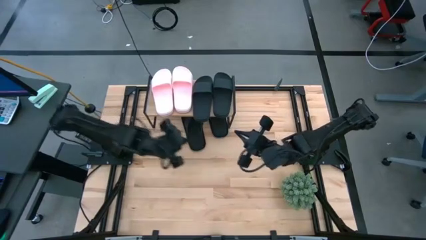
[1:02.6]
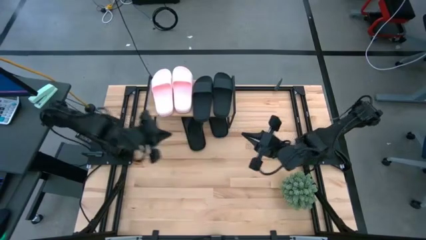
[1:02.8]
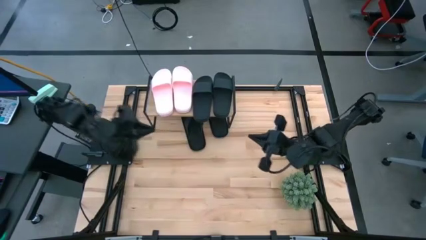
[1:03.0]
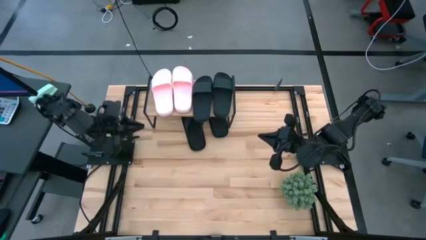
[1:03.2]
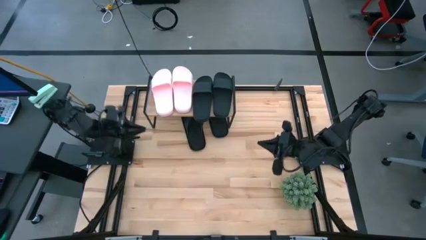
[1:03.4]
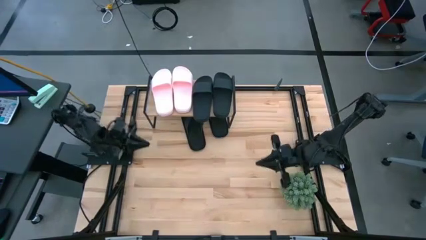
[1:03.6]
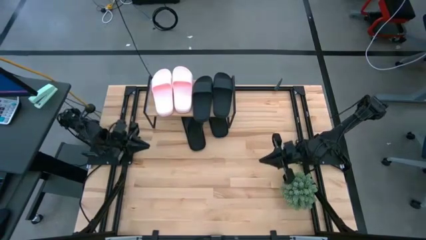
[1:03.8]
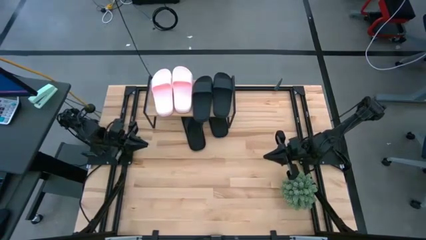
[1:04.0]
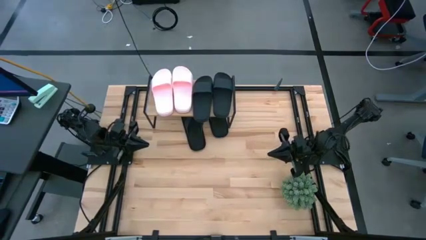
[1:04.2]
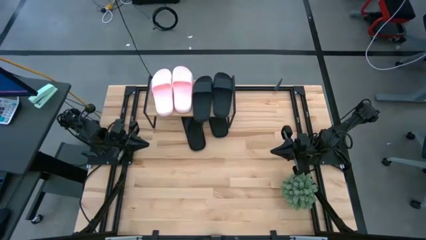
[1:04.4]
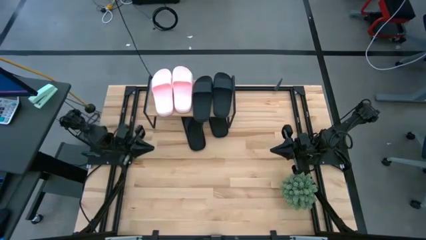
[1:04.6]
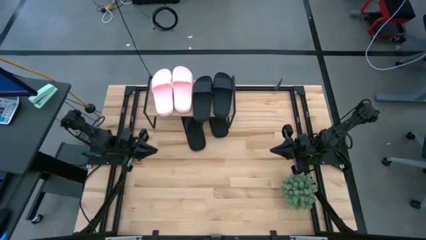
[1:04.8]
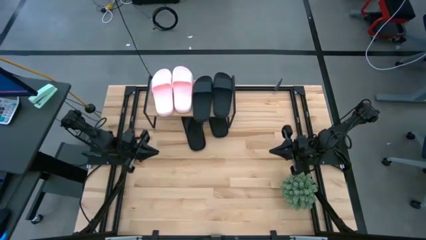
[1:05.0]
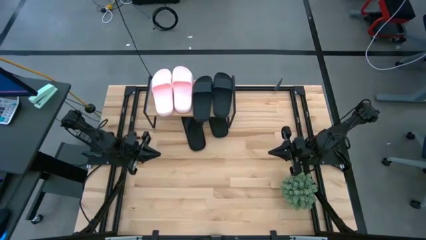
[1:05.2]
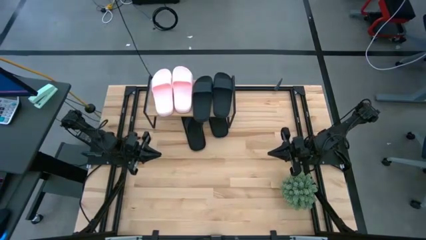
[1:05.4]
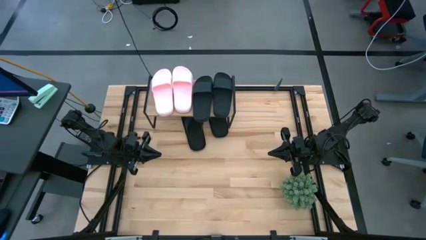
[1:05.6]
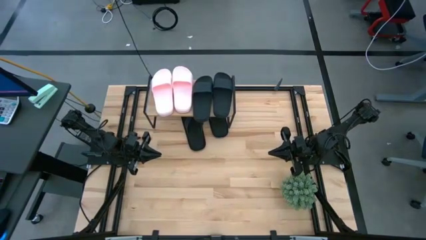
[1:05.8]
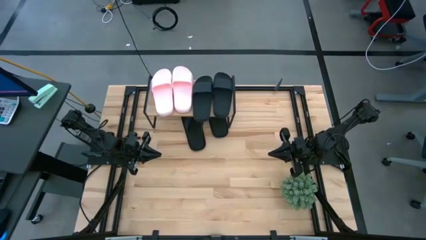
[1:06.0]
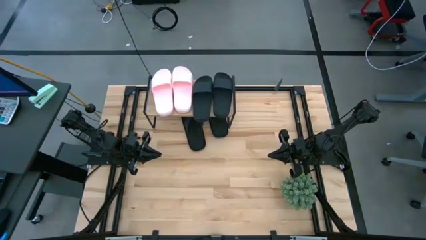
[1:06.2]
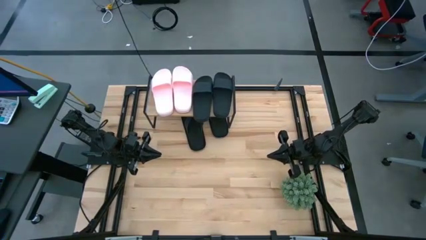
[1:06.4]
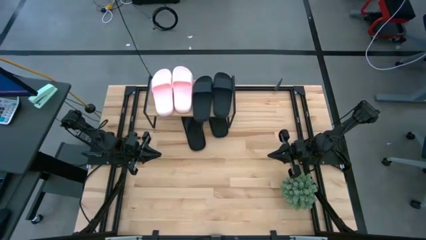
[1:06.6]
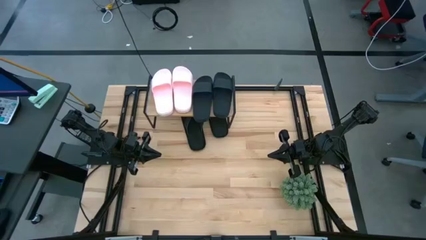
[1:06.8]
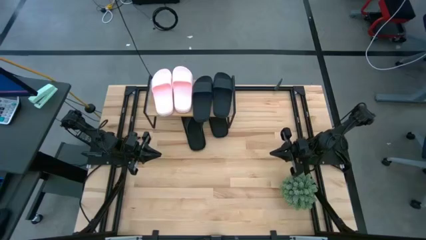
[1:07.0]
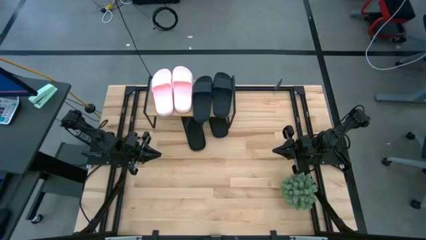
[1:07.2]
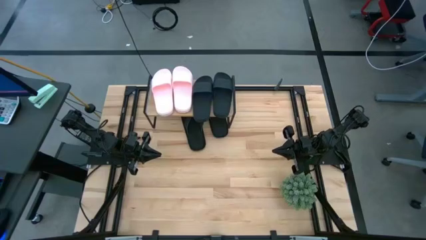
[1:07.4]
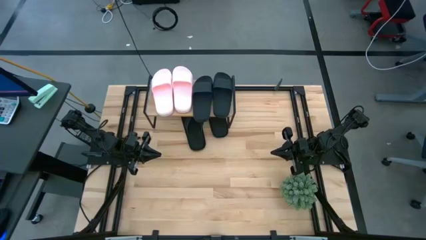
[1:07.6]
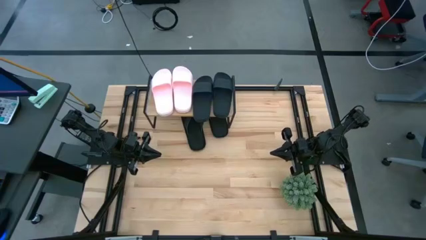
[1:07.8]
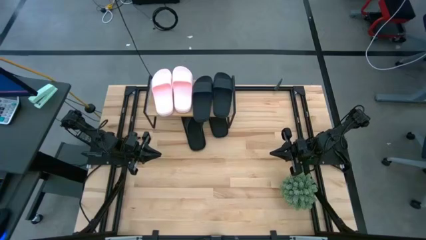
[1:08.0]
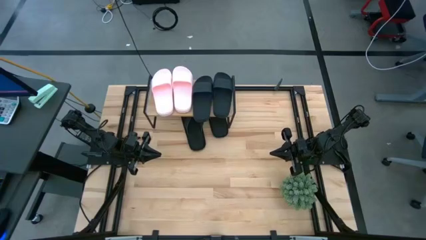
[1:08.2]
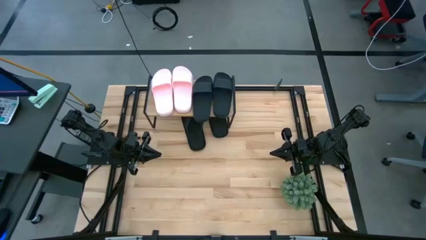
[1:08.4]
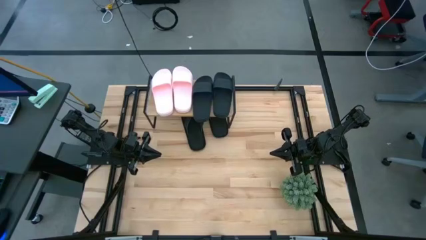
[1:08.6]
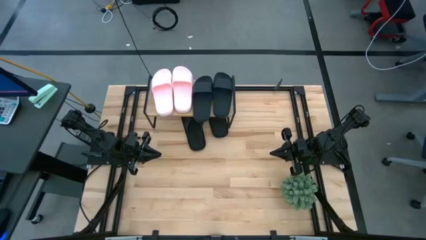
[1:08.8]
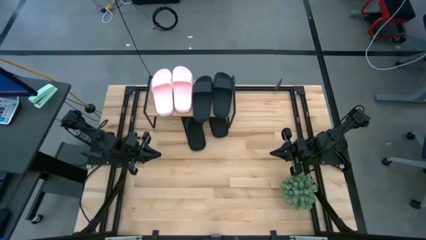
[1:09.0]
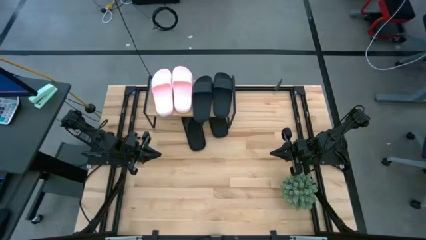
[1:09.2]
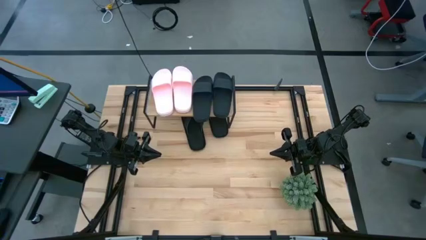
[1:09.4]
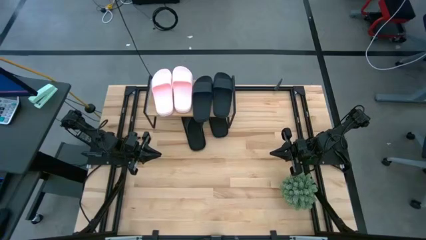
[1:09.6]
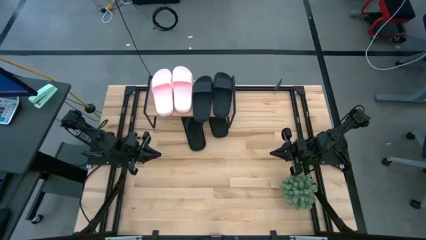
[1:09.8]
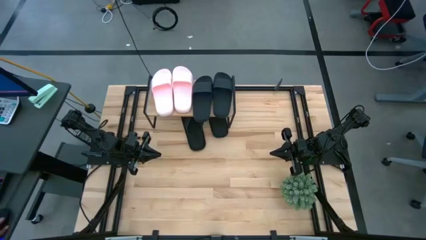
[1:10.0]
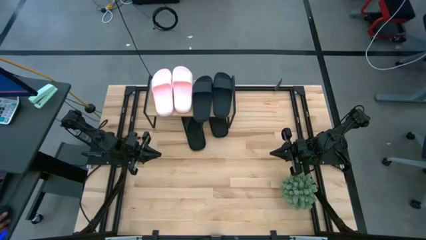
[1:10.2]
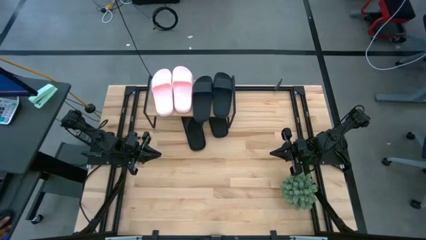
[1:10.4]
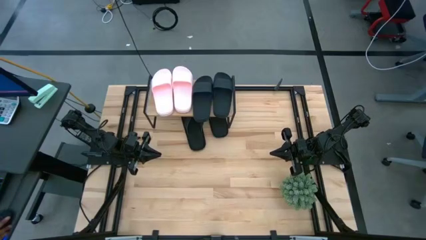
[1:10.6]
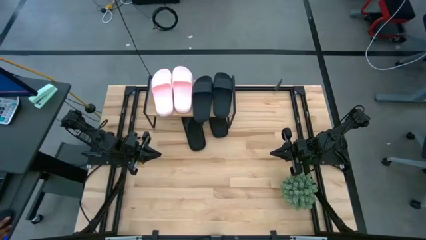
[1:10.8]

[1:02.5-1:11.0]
Task: Pick and place slides into the shelf
Return to Home Position

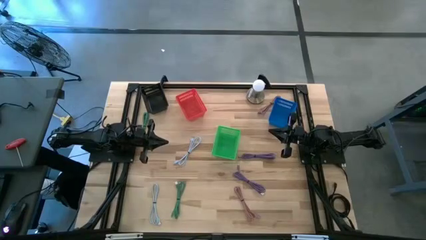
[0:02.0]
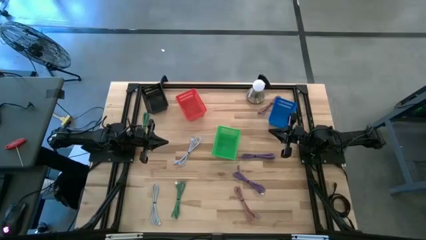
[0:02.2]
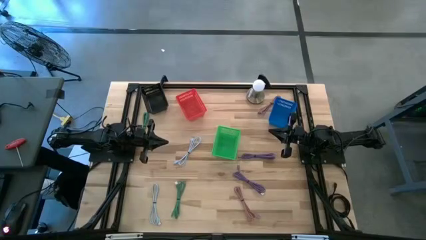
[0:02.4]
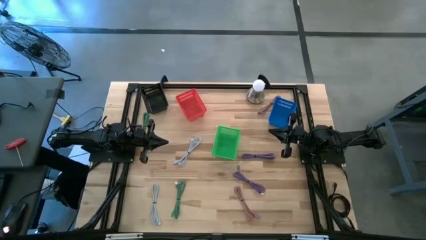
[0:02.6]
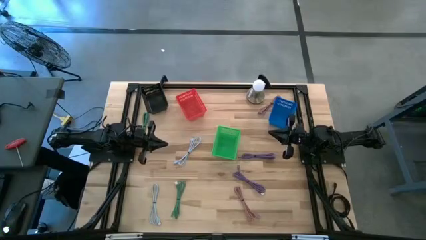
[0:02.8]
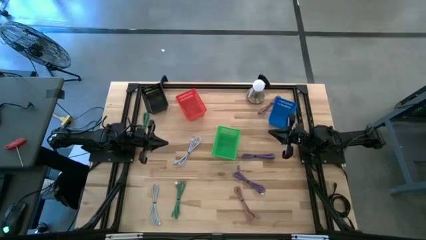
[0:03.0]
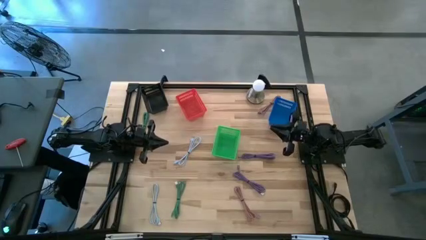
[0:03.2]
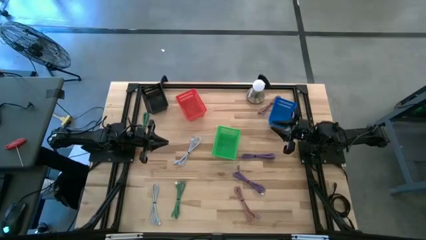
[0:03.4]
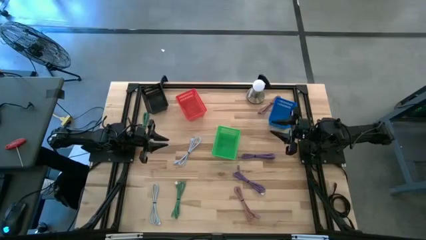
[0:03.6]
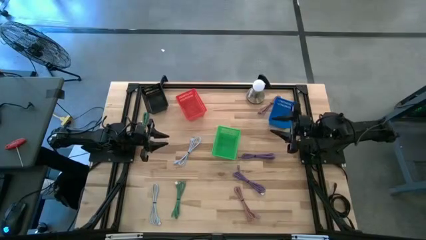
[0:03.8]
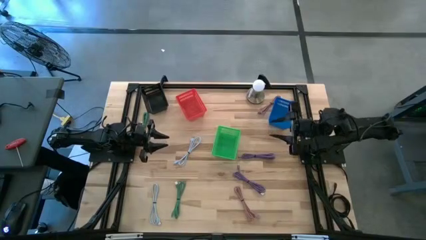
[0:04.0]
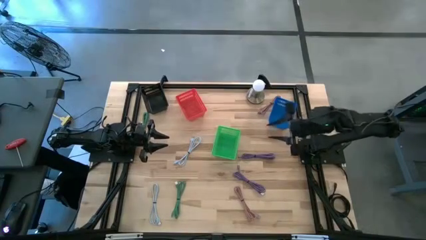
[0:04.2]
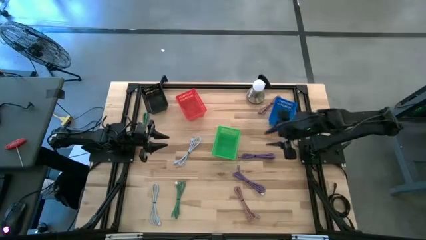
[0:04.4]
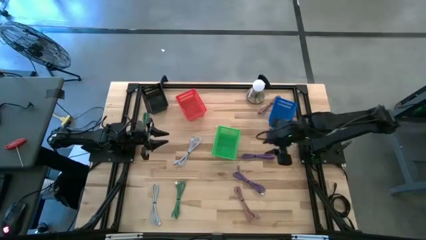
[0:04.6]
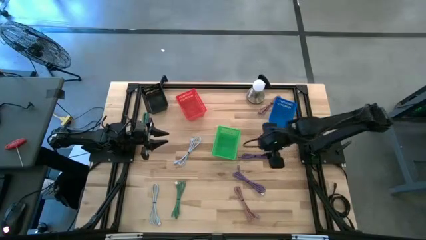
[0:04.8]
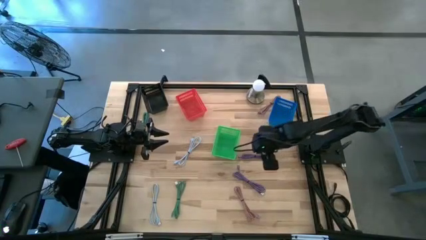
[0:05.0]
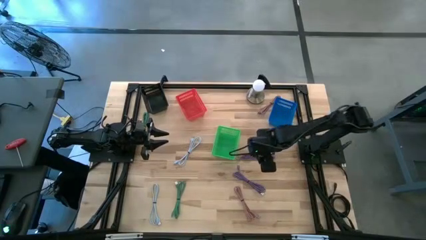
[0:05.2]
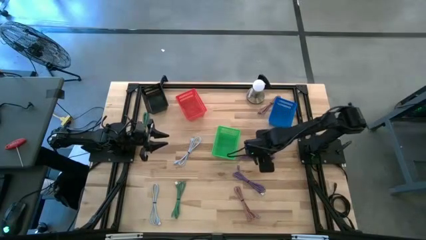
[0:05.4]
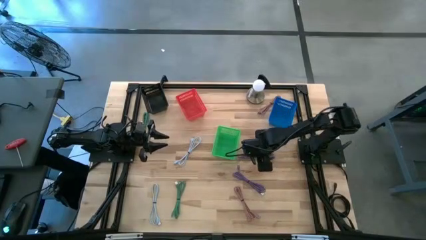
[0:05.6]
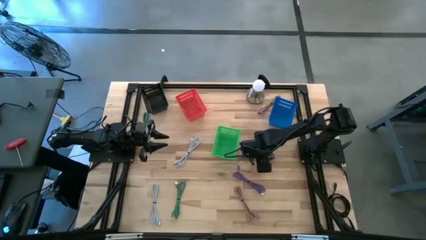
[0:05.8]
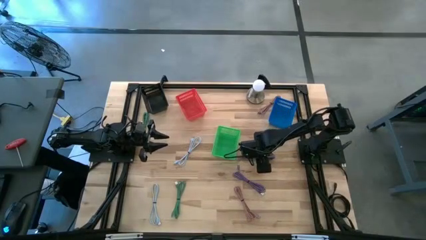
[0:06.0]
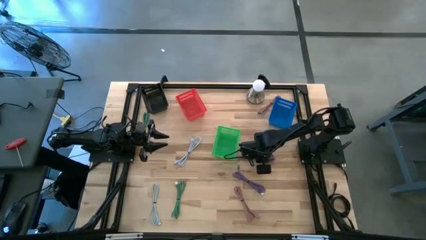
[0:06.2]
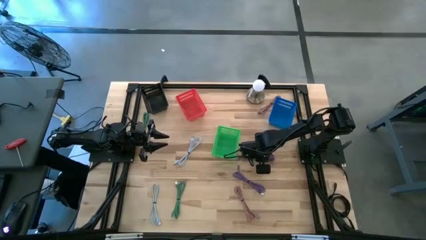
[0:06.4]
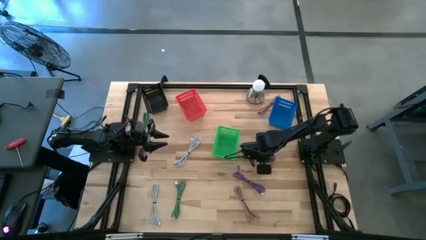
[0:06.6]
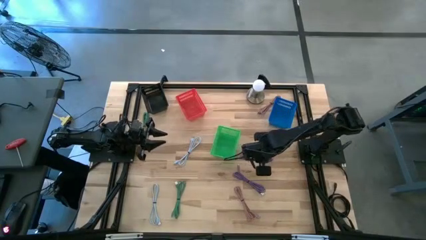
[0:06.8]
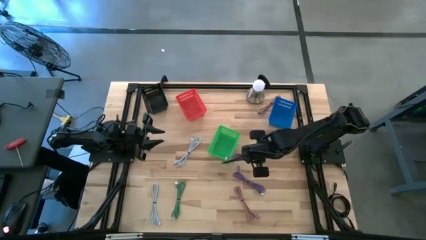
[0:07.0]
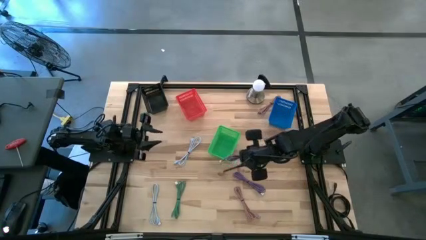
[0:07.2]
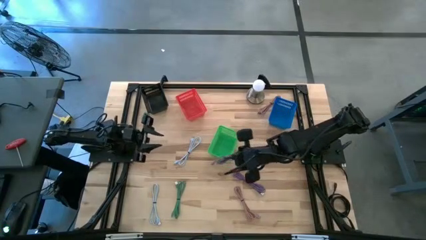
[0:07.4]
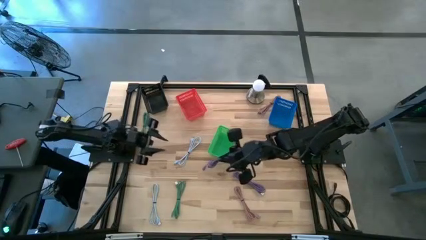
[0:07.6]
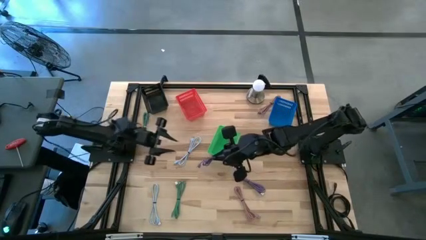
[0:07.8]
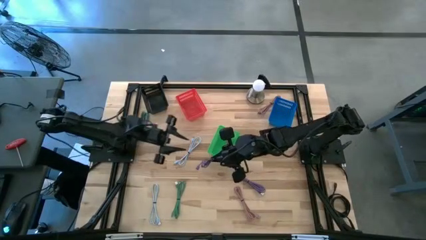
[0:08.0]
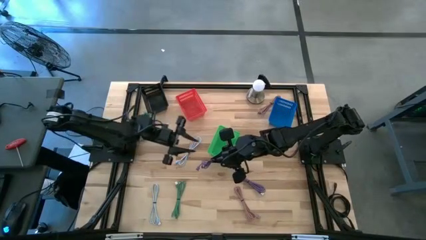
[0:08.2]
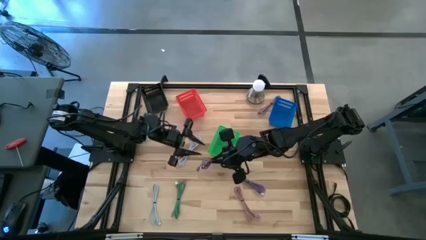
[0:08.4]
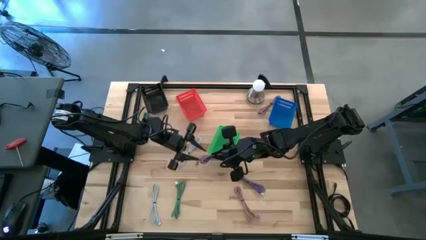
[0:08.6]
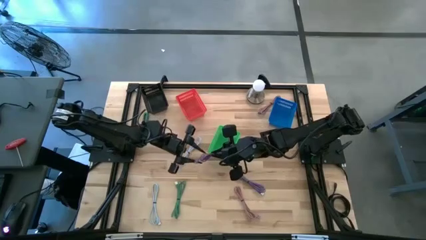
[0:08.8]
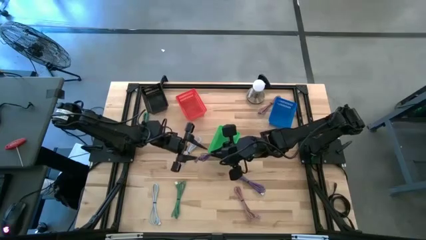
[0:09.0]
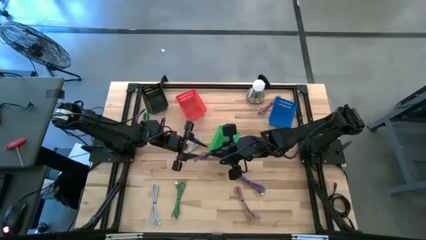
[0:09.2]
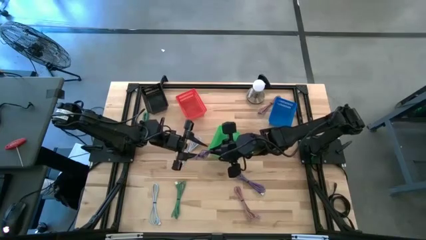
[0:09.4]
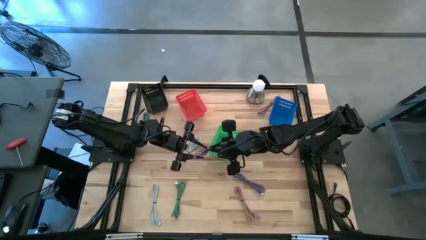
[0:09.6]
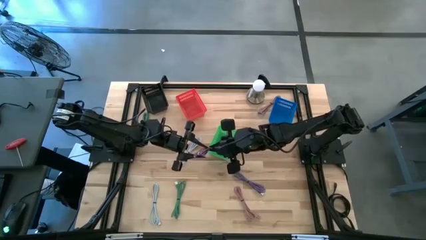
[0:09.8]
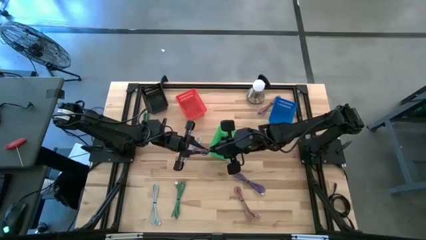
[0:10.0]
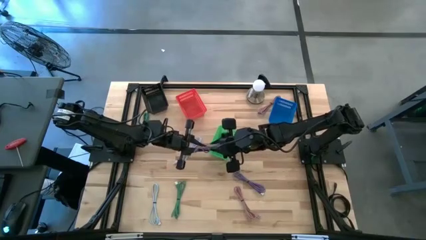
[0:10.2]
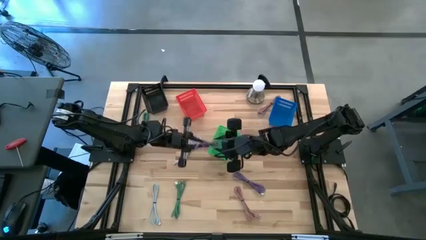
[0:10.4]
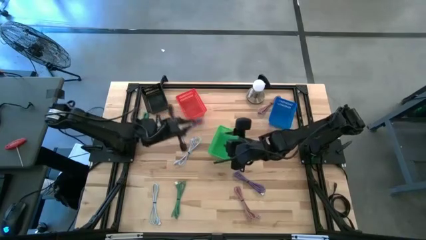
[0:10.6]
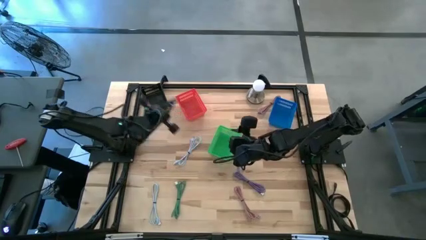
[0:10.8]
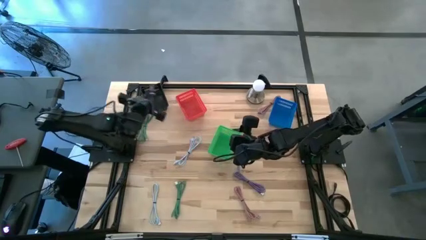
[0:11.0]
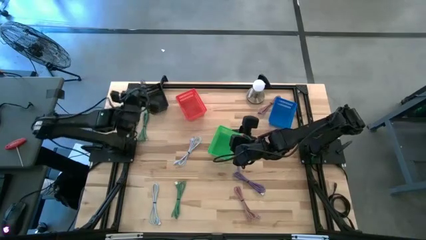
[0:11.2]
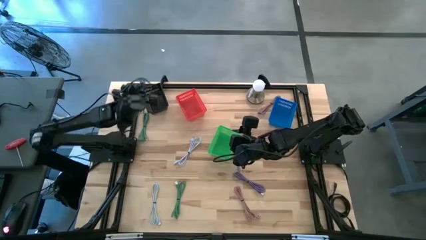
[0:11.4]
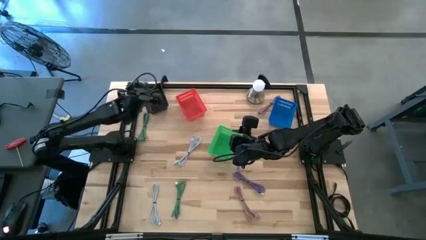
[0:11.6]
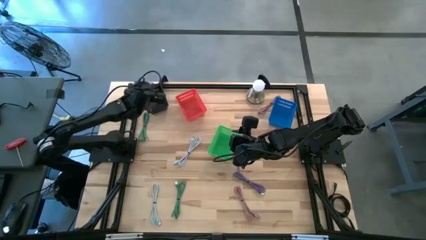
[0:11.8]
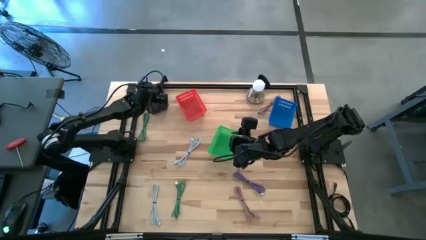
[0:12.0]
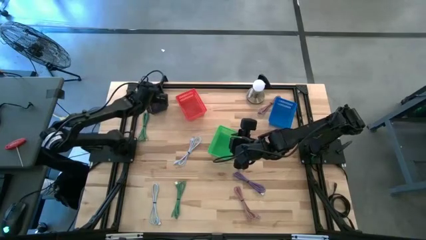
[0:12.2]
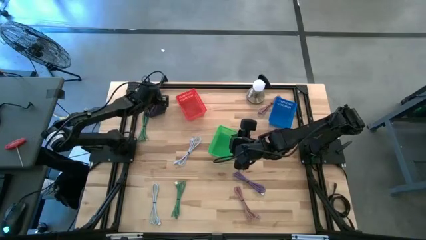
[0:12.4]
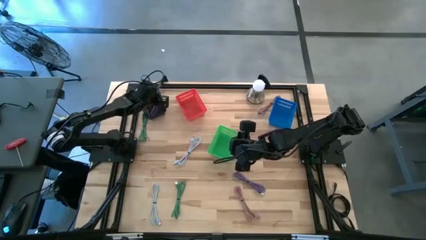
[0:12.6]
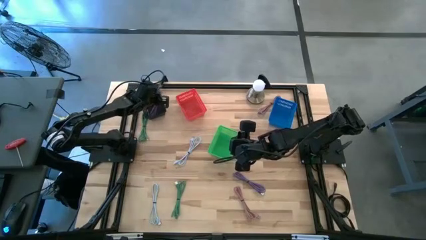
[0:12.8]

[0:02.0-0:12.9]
Task: Pick & Place USB Port
Put the top violet charger cable into the black basket
